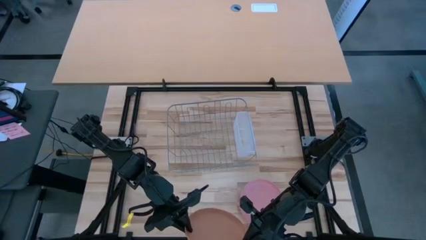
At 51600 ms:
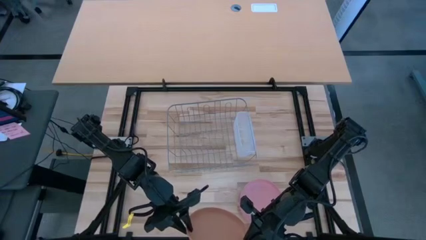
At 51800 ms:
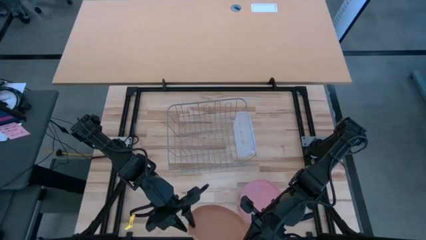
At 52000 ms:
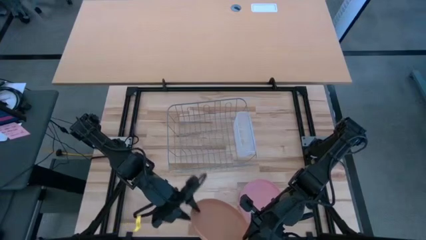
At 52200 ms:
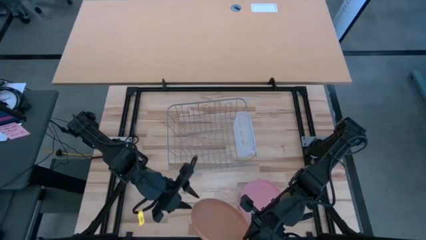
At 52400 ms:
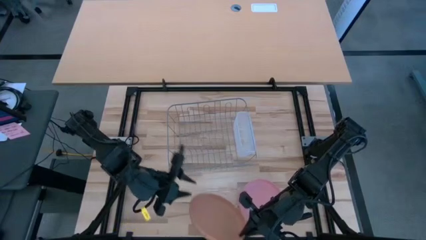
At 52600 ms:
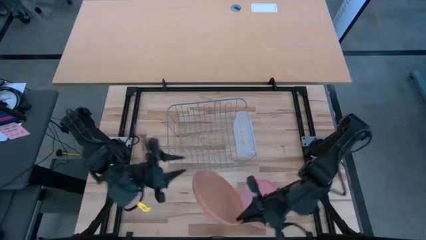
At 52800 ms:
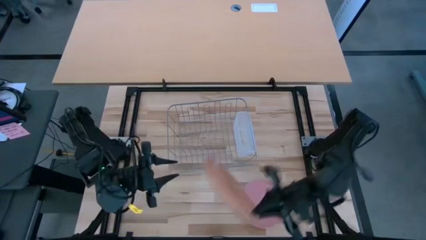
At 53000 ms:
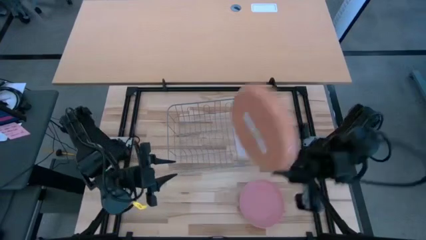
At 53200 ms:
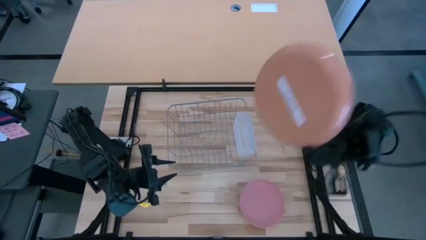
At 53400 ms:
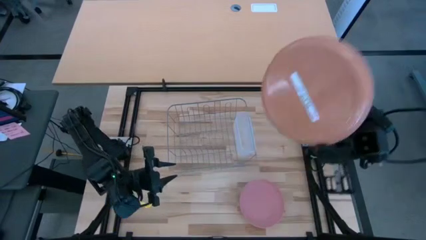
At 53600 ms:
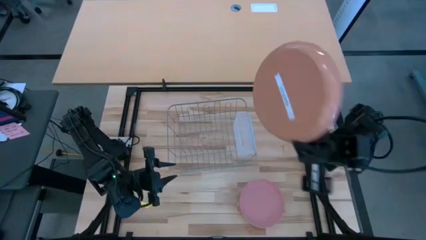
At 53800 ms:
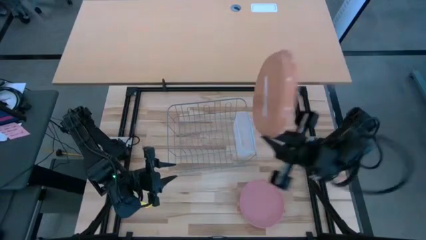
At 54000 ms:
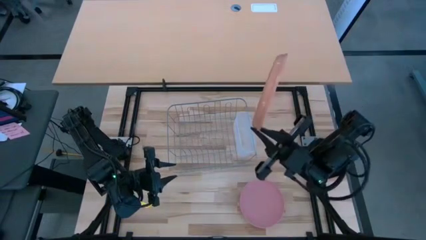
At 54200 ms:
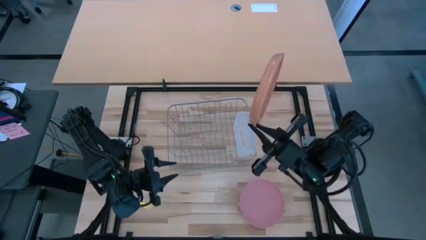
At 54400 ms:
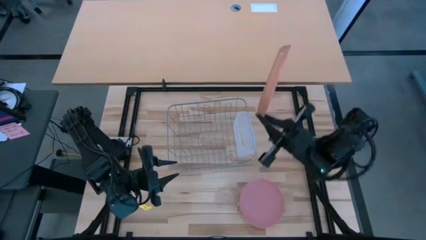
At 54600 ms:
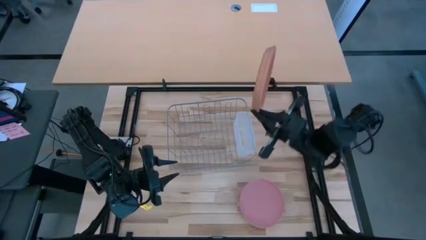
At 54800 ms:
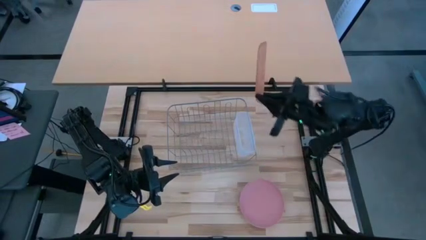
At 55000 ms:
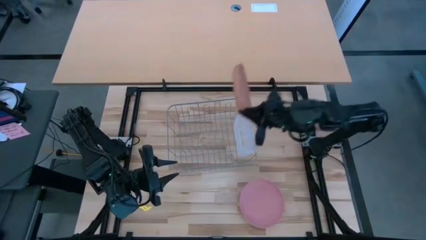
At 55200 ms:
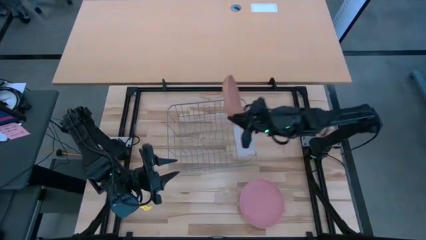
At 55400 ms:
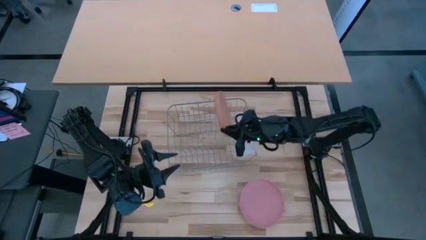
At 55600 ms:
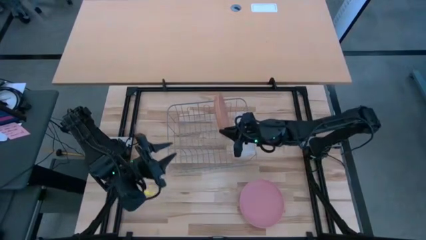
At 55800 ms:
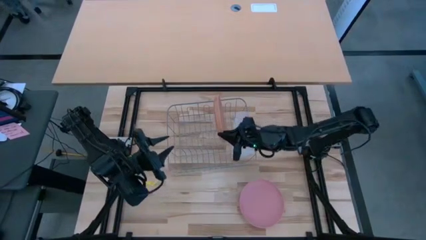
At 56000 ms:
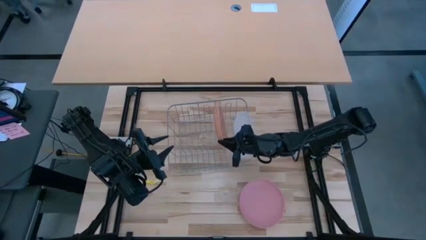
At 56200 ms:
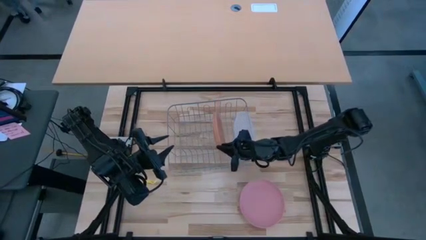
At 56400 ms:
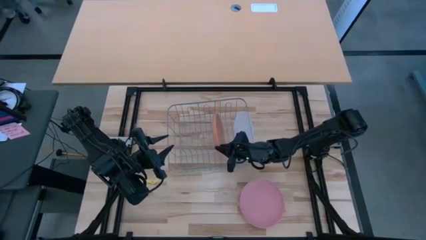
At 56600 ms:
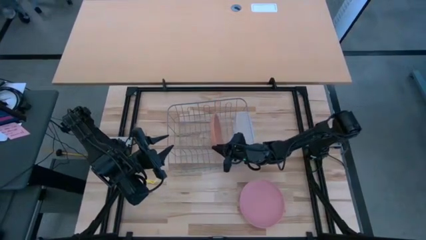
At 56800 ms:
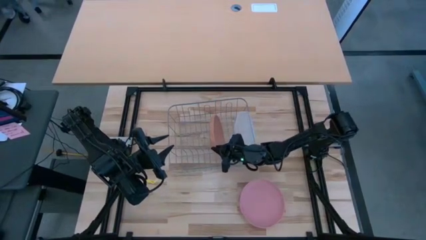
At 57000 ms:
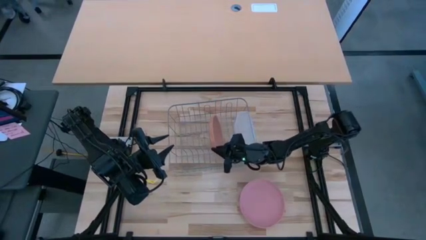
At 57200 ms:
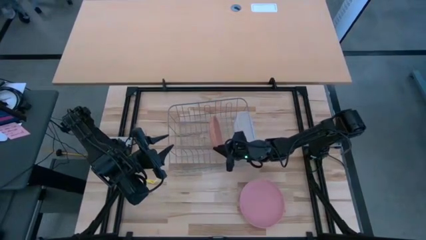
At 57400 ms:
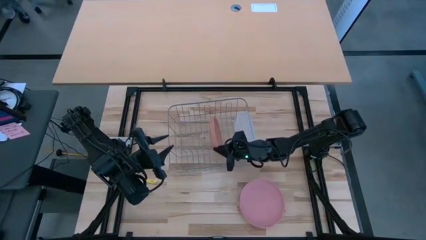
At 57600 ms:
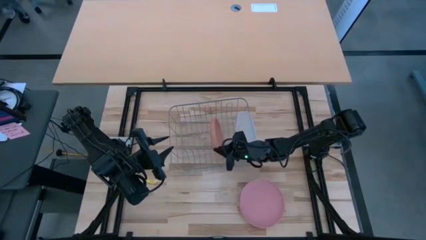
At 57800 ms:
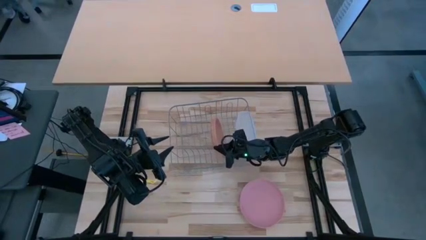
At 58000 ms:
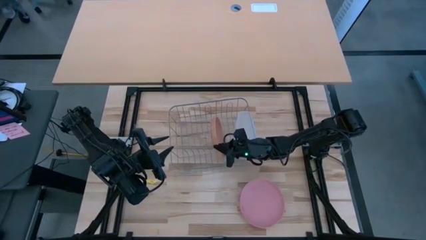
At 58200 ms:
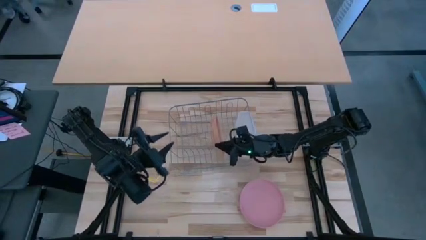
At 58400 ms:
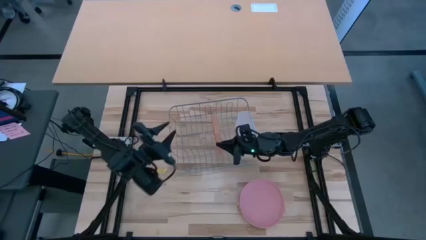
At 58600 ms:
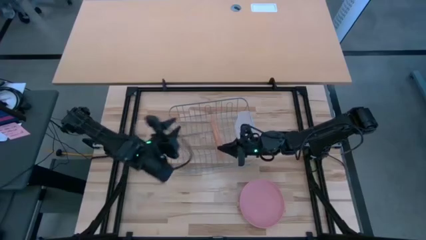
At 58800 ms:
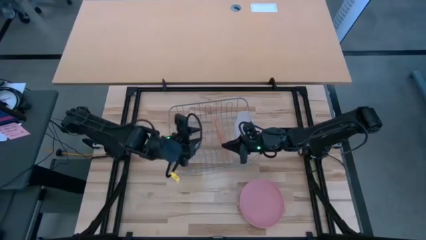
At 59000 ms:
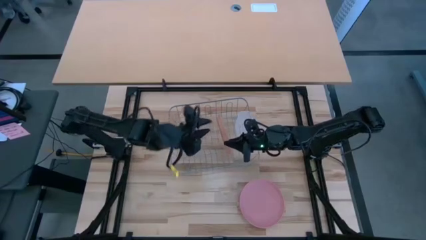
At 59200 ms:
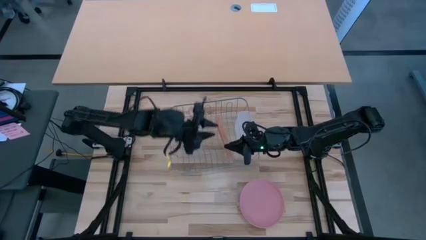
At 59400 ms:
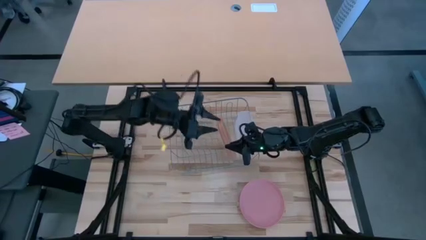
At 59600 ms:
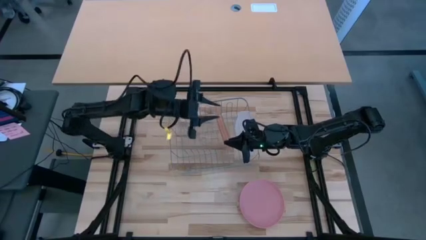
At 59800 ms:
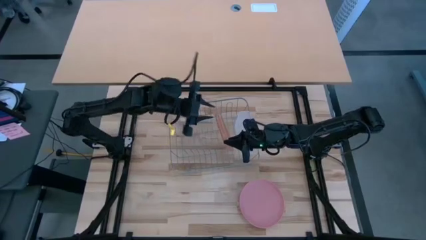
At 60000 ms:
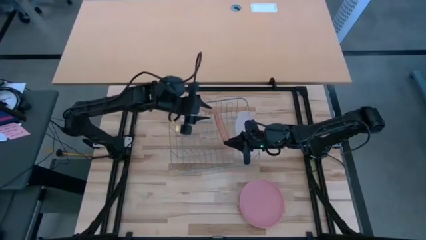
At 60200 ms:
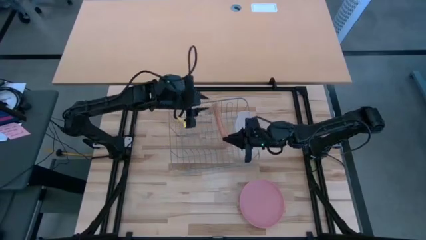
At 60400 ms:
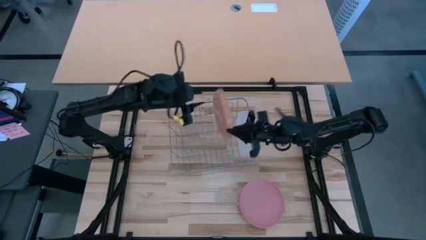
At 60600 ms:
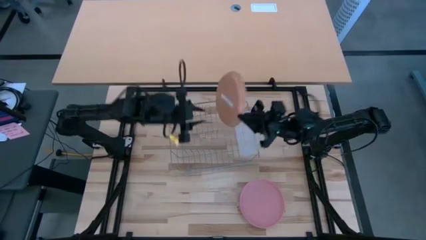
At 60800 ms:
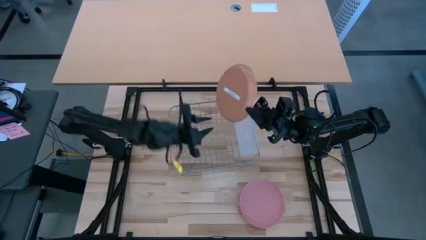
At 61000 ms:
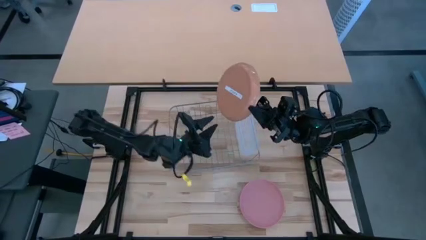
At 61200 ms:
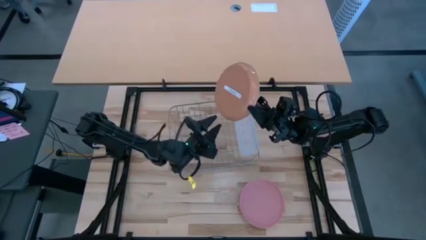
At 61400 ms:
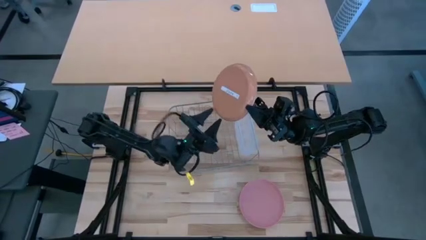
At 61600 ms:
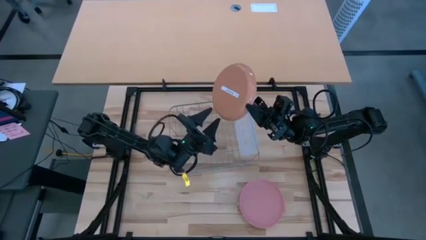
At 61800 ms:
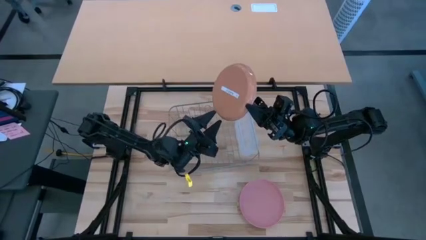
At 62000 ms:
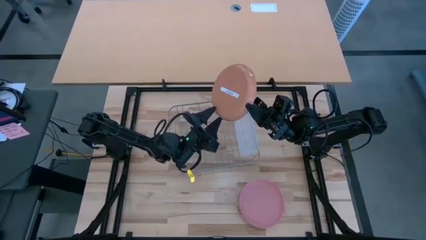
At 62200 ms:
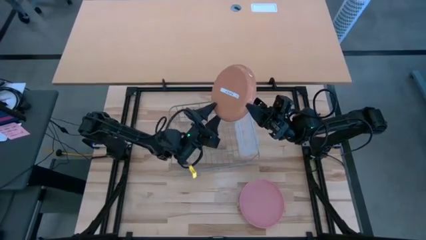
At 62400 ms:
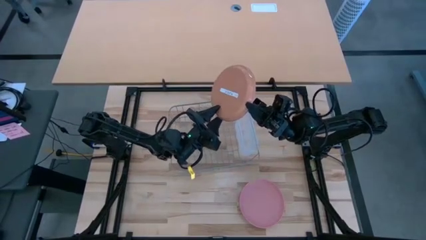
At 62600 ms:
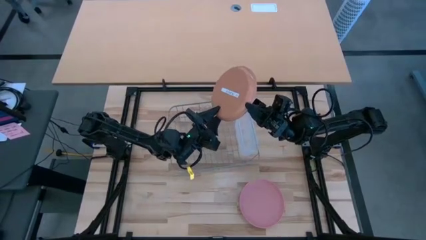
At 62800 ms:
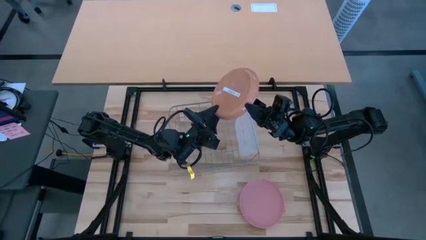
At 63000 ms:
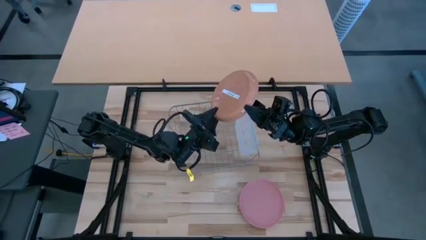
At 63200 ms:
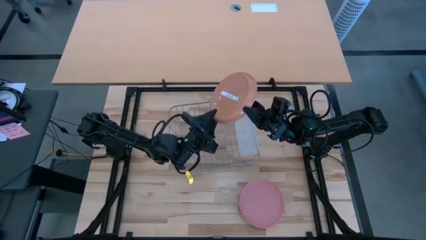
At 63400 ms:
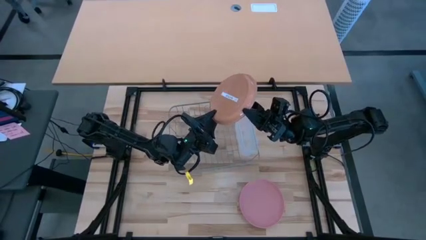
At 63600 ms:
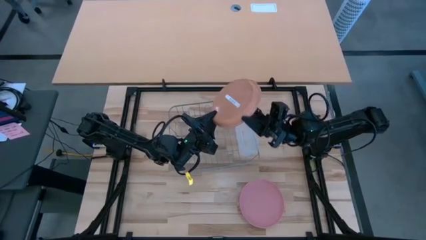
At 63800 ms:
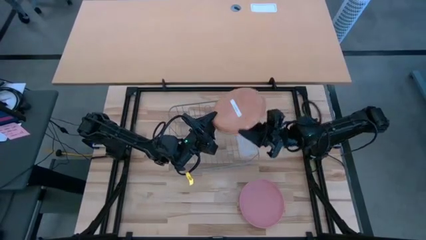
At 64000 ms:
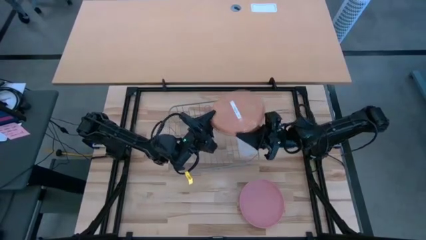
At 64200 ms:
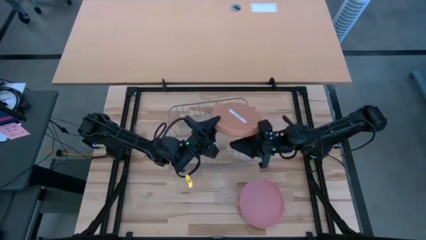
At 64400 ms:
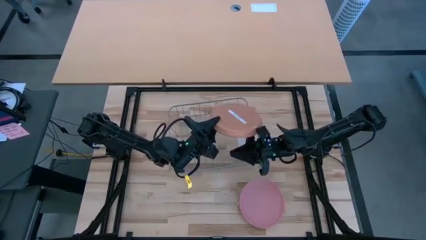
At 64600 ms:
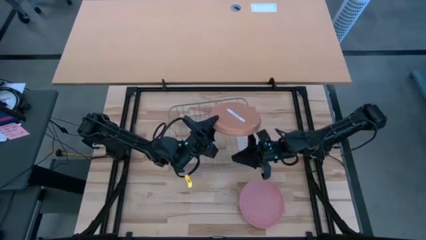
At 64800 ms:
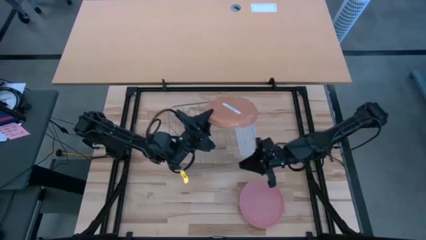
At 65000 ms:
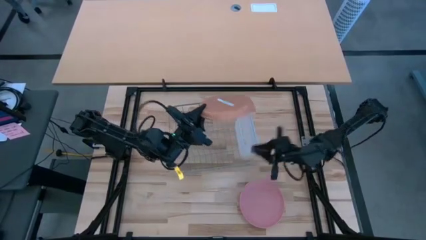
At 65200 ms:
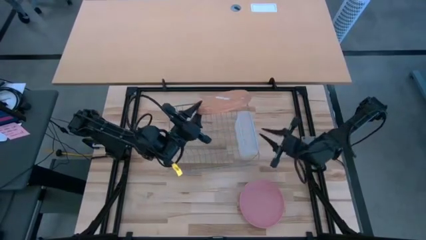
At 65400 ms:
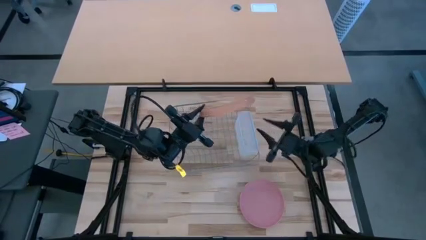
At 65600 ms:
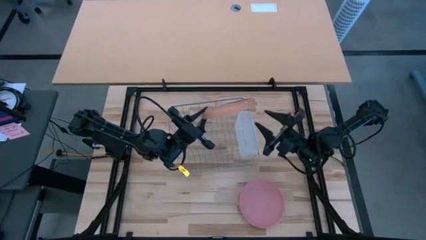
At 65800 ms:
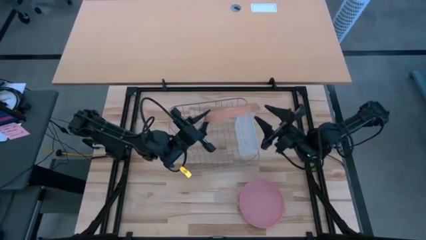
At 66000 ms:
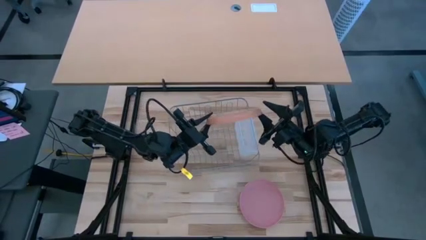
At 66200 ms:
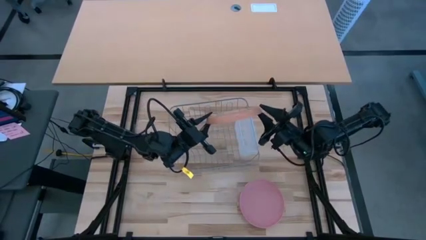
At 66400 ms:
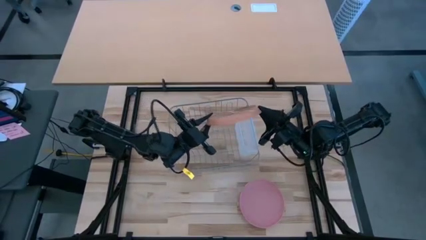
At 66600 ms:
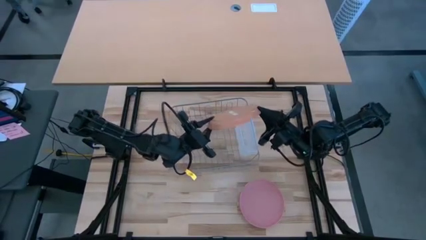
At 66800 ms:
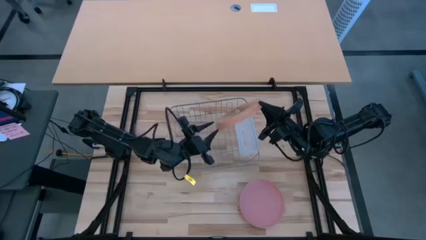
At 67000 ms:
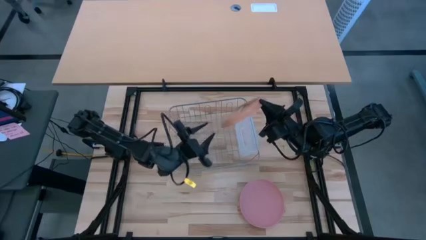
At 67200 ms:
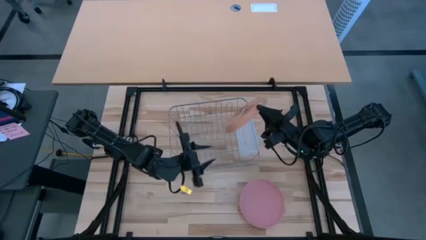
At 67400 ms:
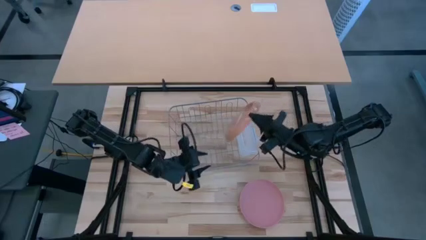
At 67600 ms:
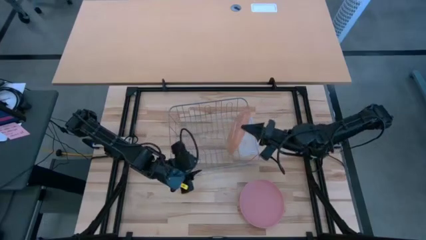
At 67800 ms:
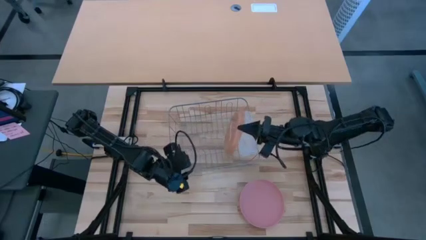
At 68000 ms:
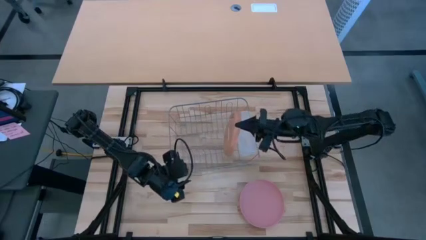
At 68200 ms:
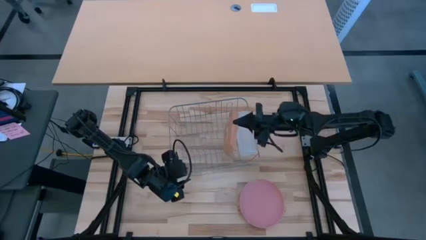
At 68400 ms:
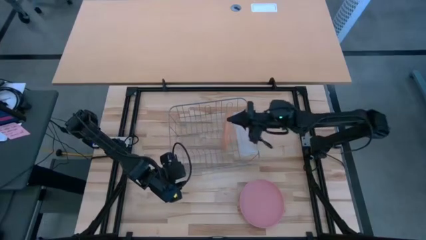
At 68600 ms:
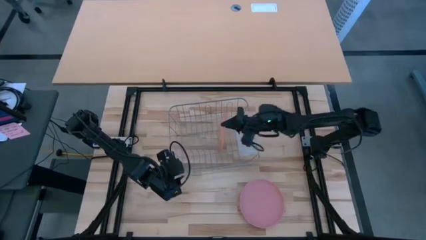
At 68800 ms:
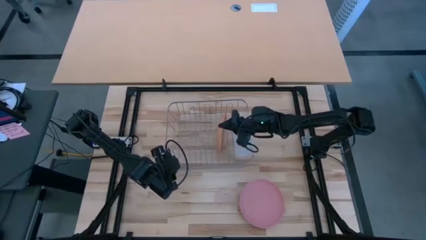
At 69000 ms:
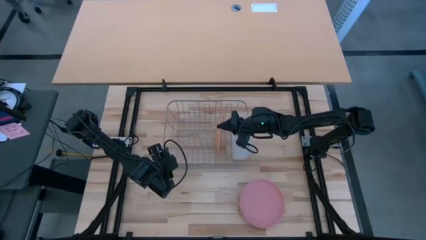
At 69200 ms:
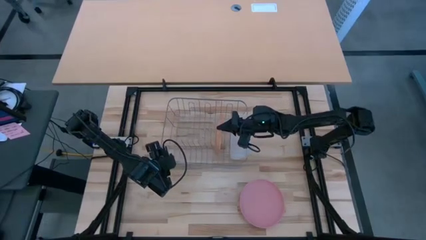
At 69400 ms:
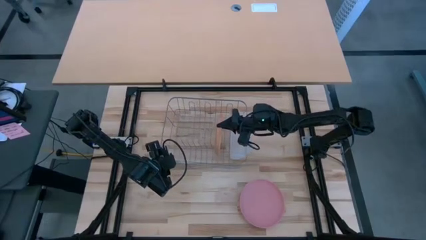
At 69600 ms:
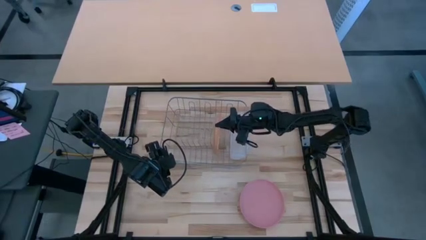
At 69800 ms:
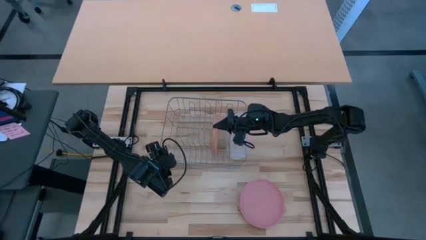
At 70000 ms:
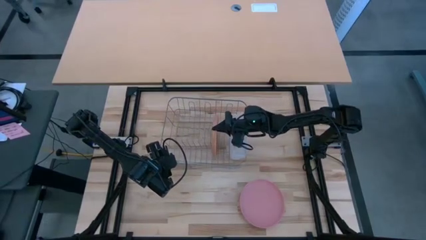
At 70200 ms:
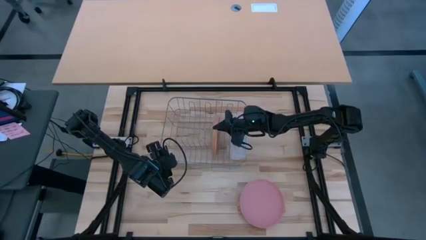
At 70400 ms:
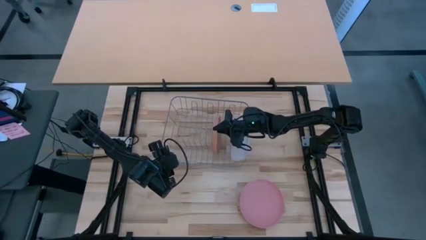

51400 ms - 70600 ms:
Task: Sort dishes
Put the brown plate in the dish rack
